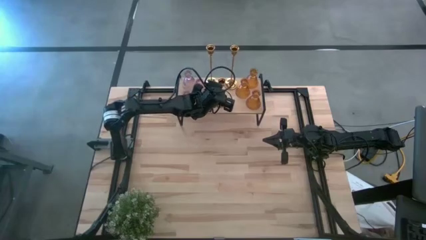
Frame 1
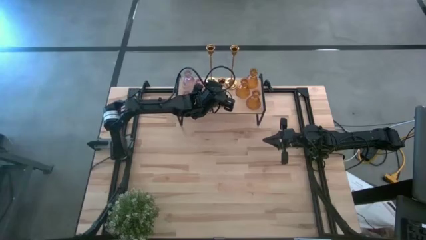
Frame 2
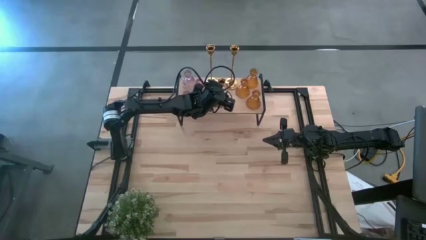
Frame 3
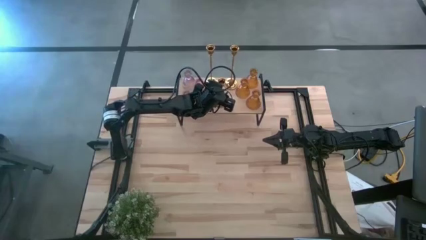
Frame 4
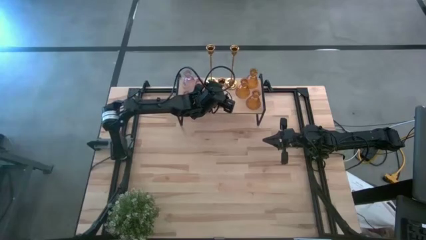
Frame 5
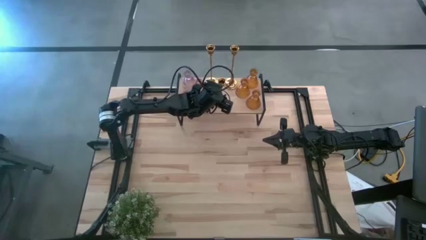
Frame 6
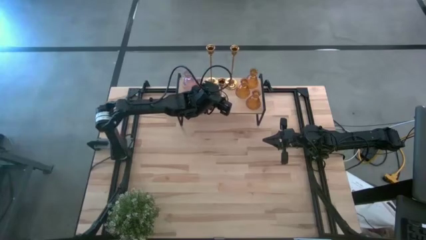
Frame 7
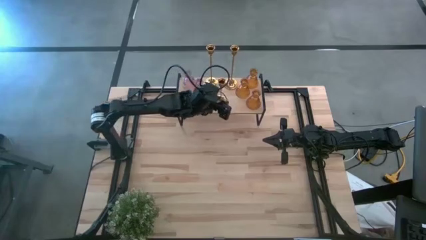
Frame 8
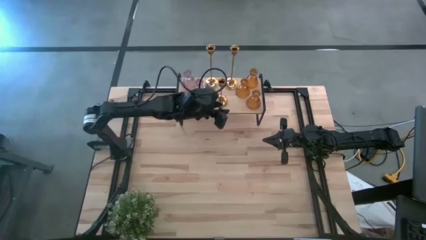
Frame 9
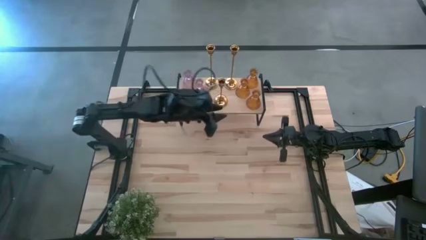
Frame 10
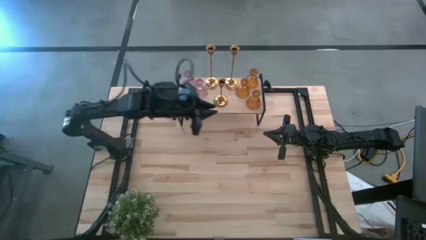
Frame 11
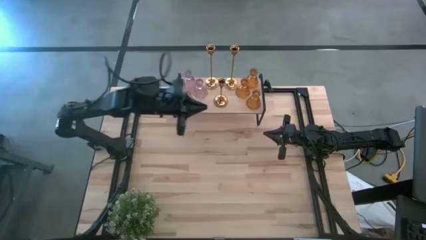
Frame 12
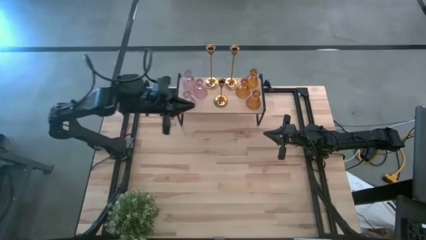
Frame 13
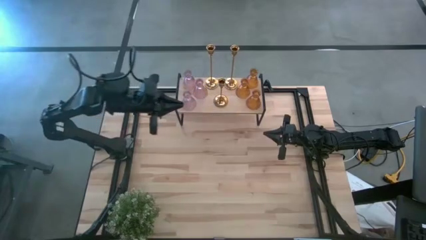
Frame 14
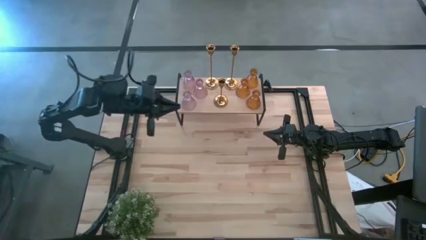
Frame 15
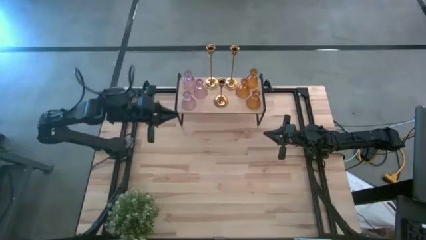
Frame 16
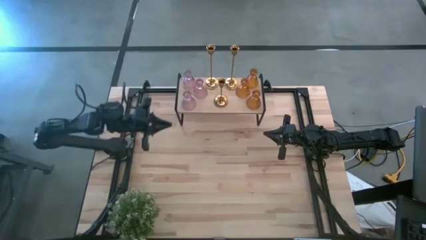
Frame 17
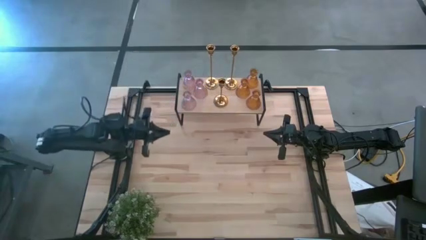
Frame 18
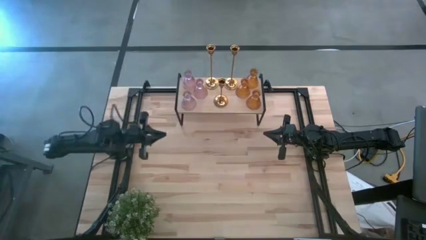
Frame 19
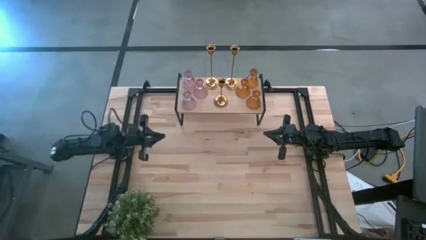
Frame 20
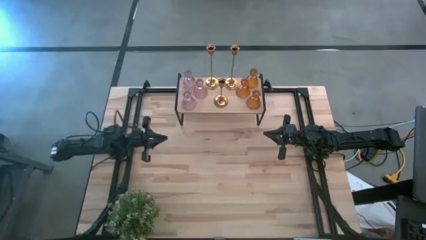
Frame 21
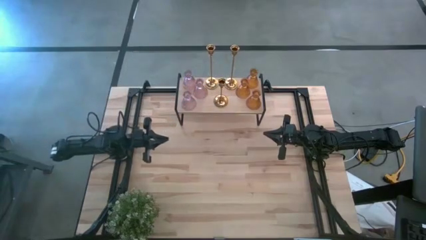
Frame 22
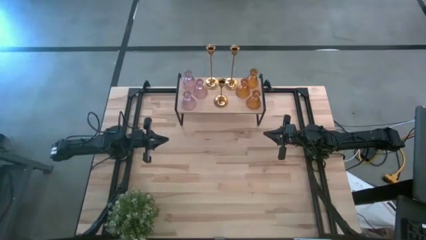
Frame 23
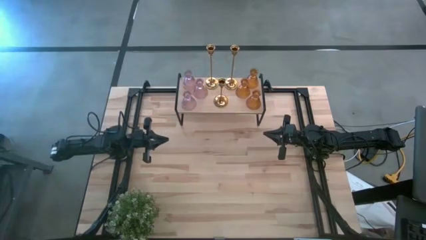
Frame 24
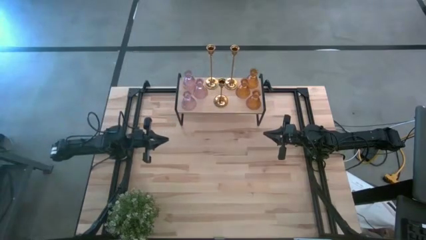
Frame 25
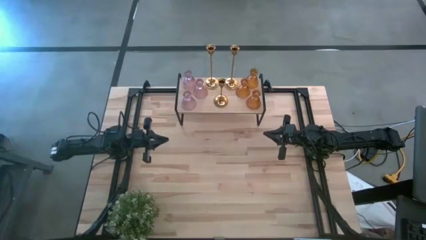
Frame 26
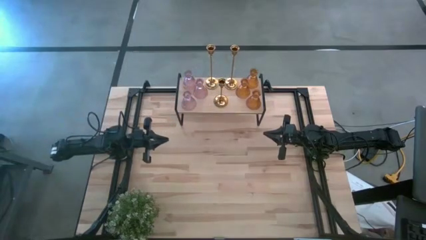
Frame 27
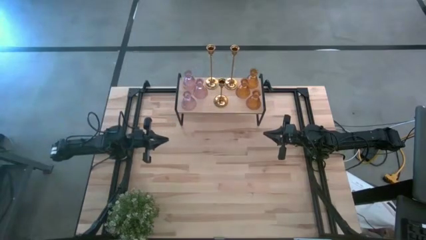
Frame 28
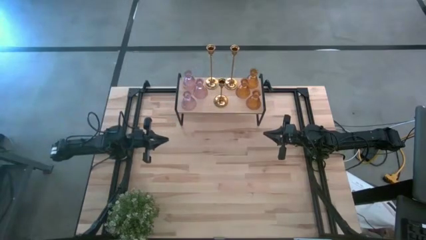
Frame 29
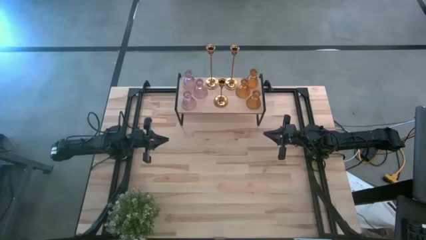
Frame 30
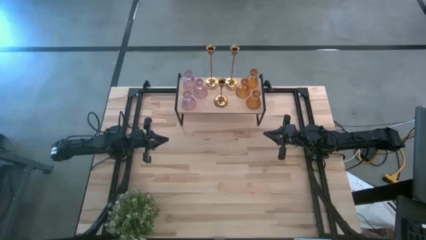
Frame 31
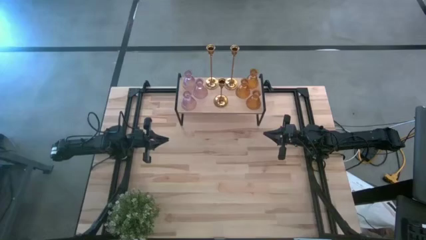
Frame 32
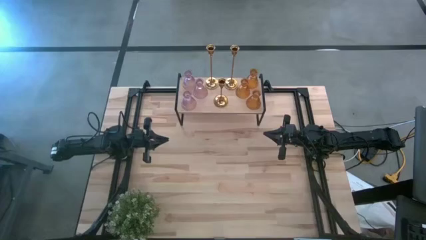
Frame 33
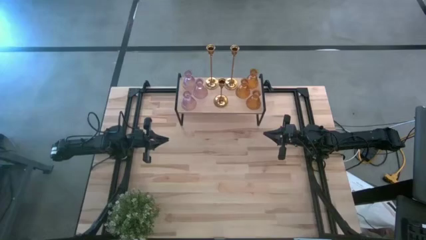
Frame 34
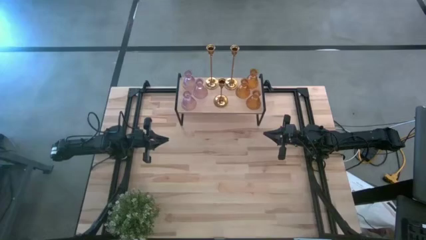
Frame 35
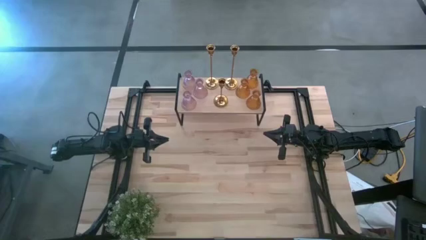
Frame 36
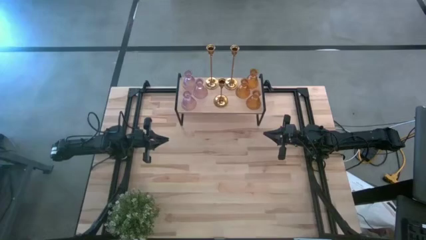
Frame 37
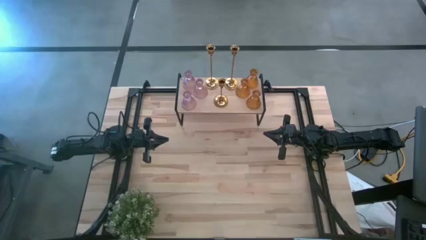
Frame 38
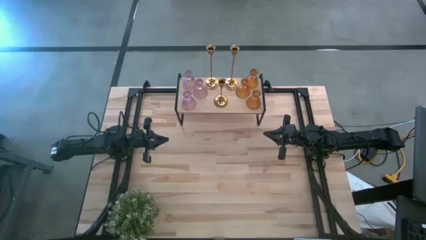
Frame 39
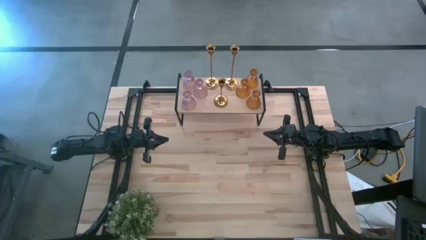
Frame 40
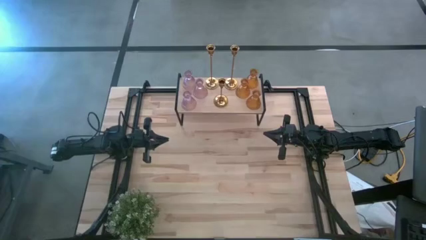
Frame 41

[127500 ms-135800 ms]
Task: Pick & Place candle stick holders
Return to Home Position

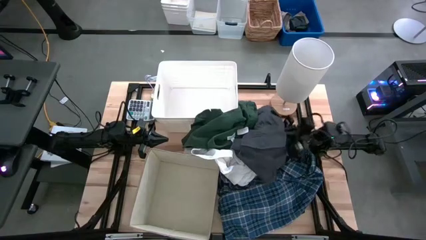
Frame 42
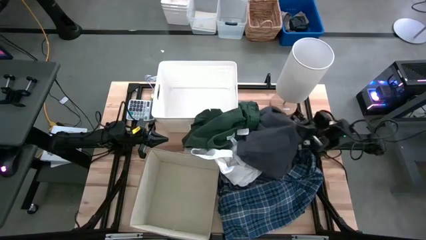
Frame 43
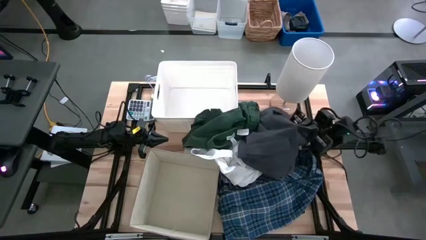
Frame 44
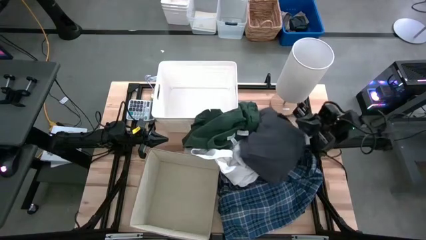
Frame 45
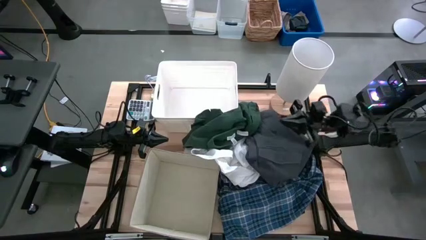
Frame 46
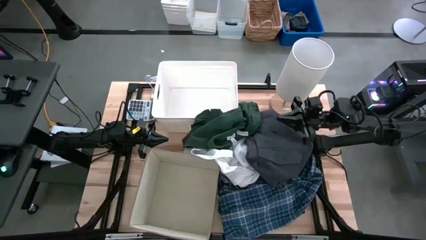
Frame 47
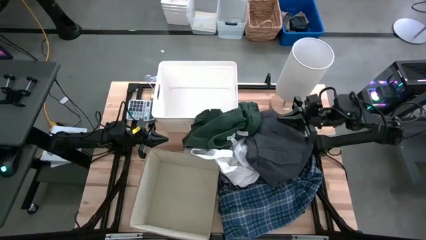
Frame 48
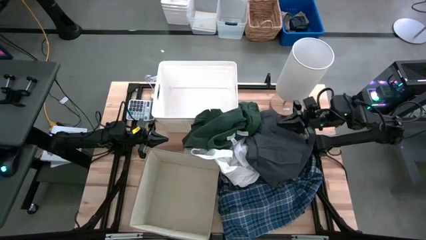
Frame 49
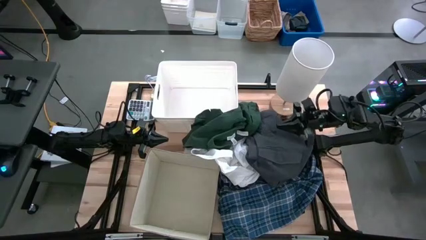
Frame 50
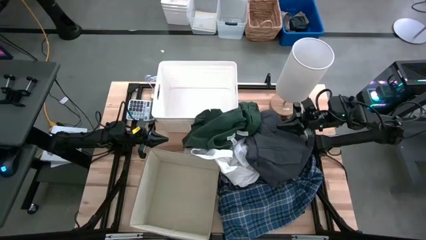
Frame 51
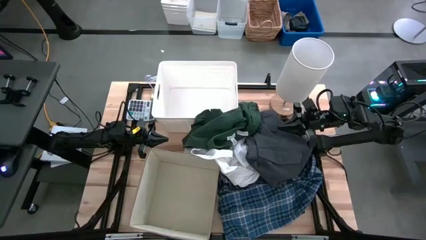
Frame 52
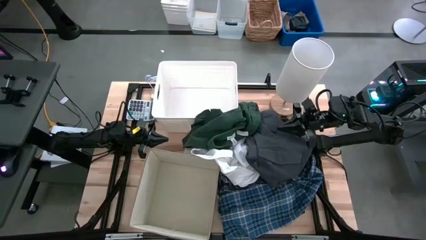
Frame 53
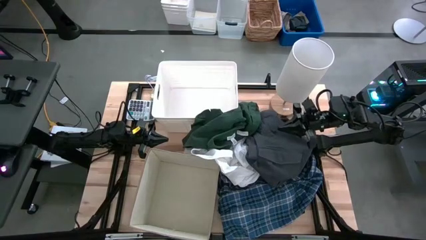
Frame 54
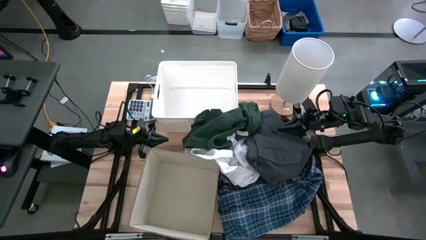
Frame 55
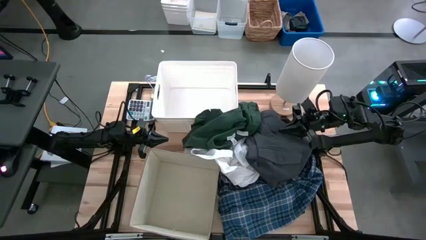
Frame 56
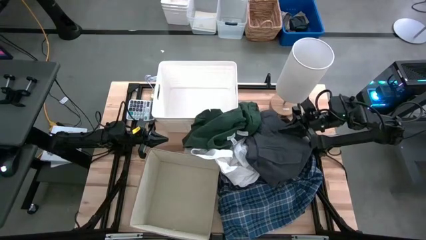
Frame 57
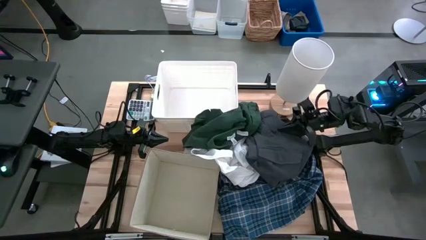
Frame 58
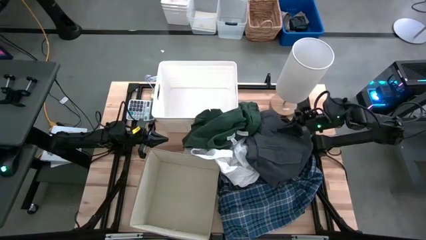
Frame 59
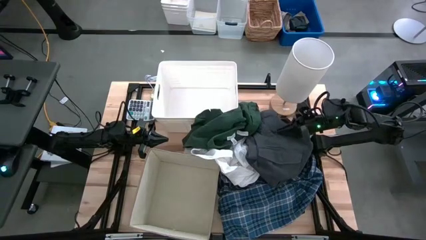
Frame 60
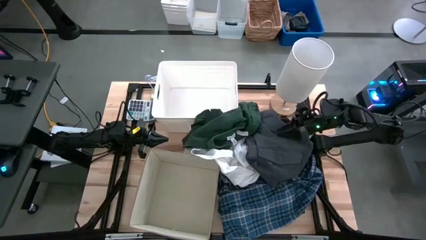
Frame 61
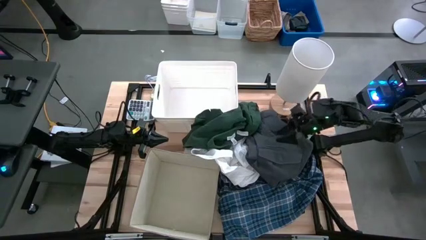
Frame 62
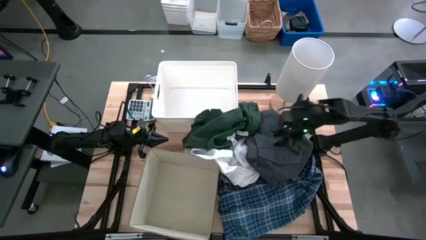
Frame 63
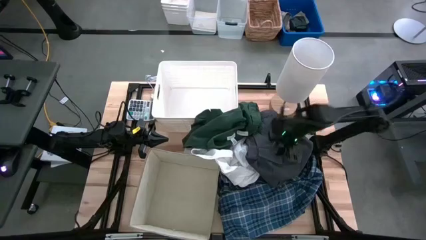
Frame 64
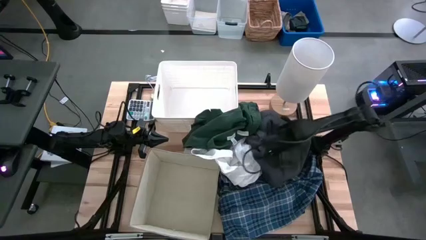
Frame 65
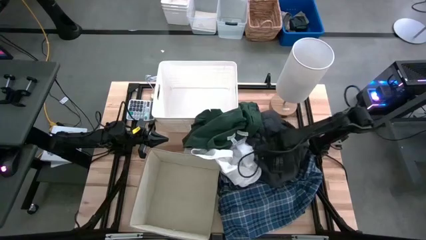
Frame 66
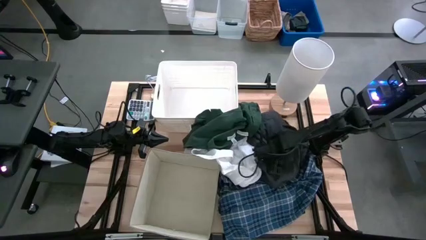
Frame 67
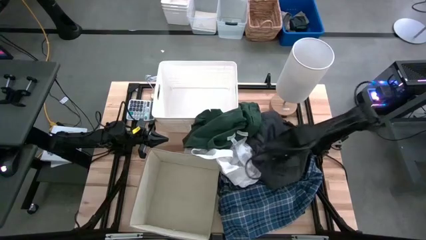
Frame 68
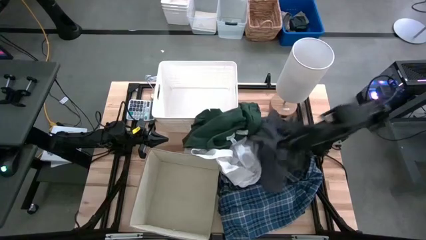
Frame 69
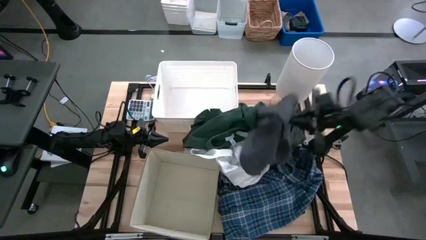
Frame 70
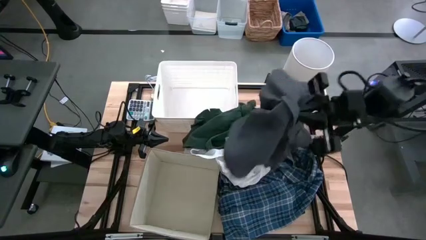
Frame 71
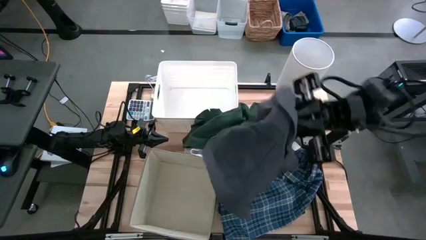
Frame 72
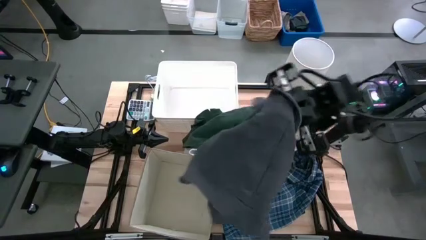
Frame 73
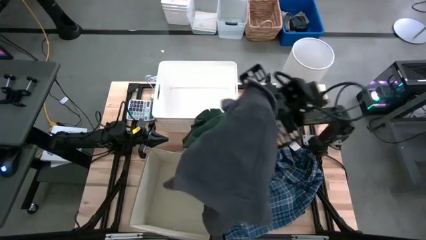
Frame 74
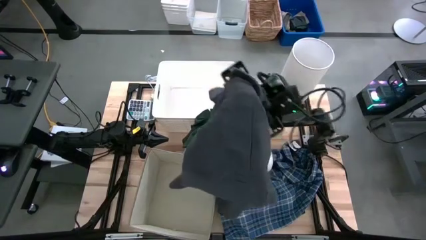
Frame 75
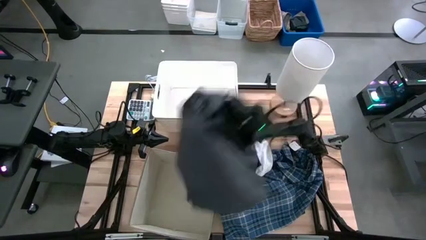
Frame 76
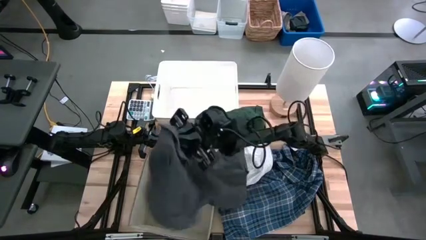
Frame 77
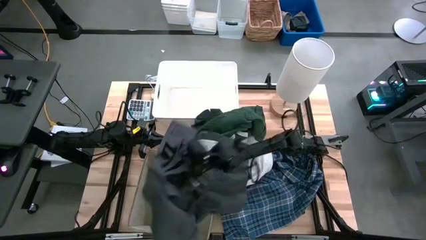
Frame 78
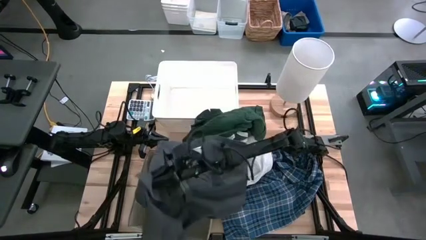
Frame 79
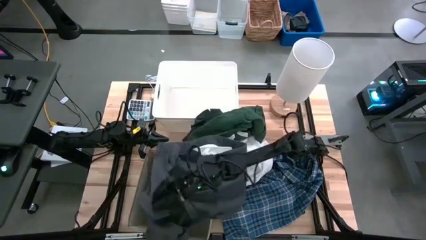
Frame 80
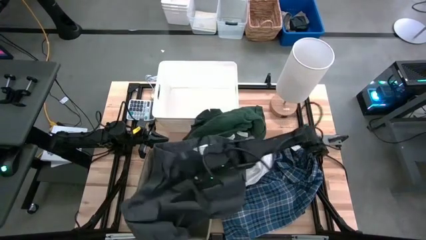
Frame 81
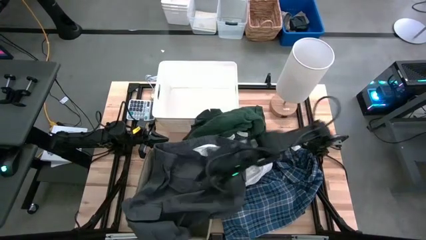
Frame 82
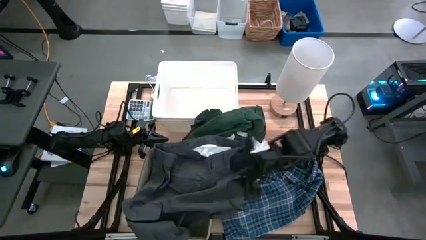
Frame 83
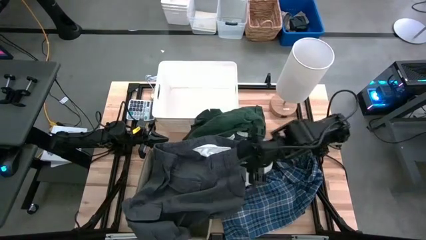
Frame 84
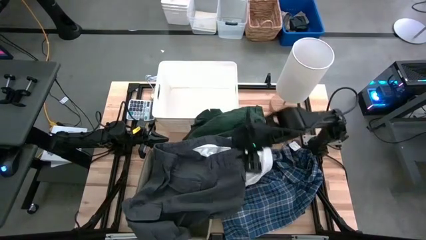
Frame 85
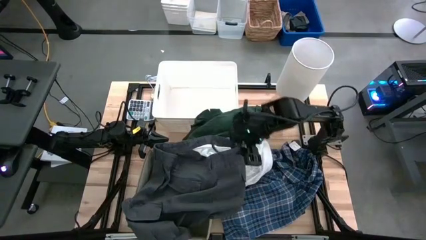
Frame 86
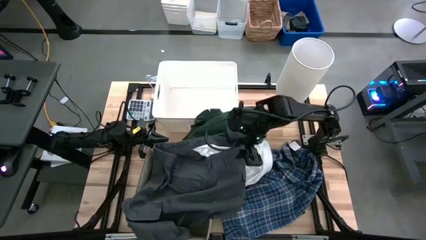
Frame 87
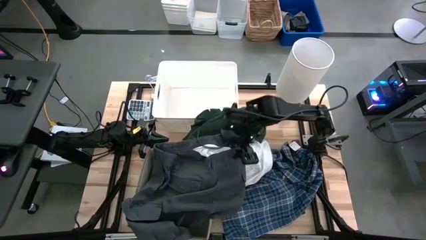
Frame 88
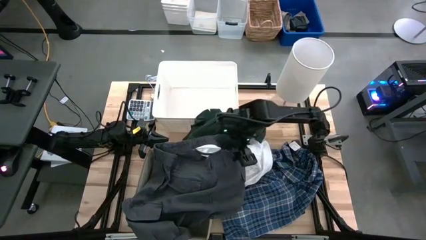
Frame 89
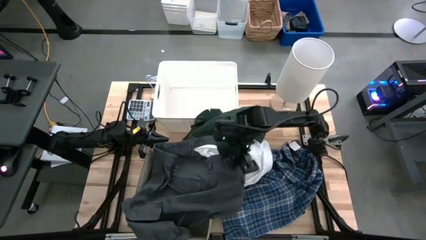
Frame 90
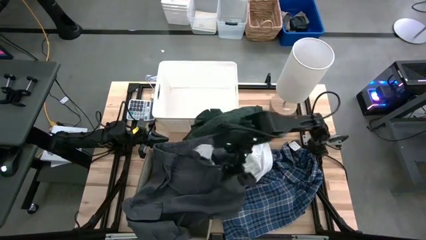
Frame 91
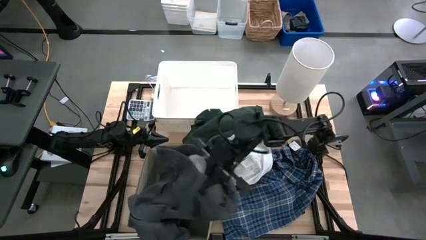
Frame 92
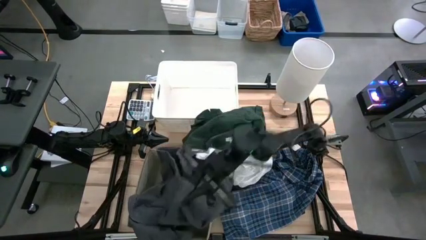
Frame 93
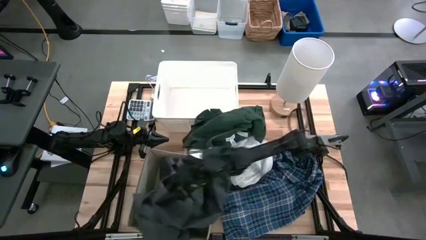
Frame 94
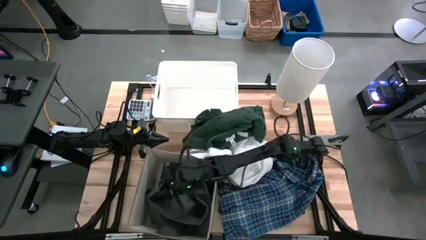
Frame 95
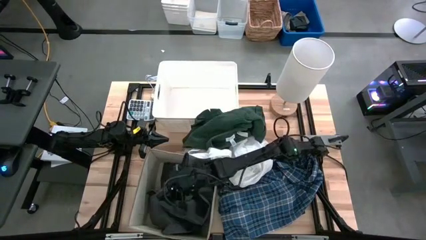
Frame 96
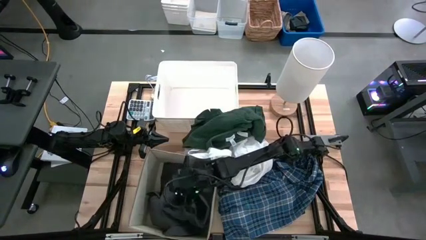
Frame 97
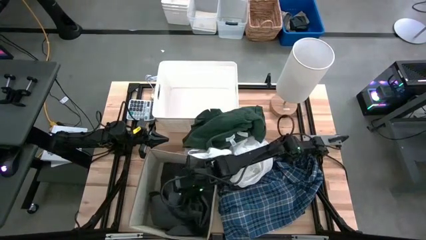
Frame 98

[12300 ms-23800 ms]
Task: Sort clothes
Put the grey pants into the laundry organizer
